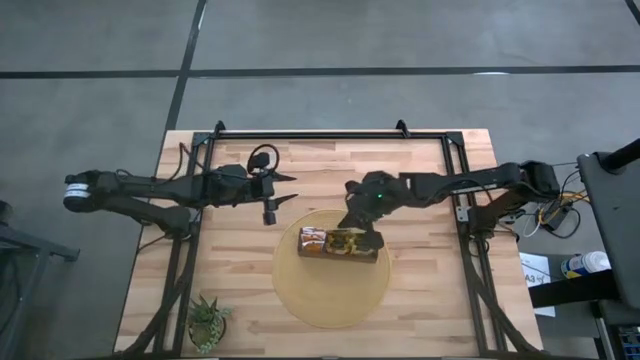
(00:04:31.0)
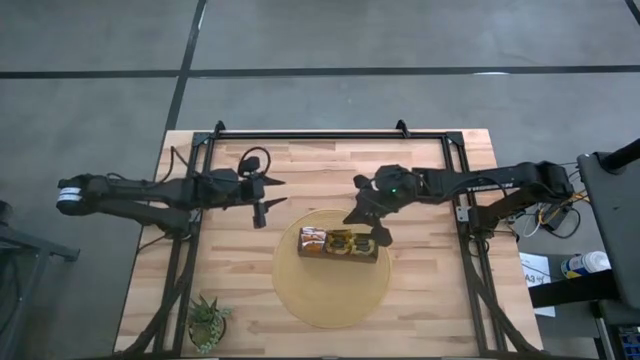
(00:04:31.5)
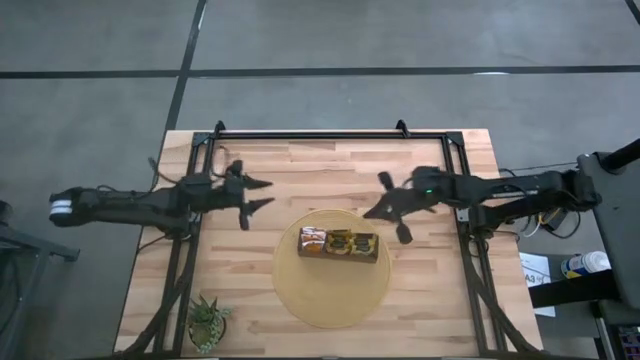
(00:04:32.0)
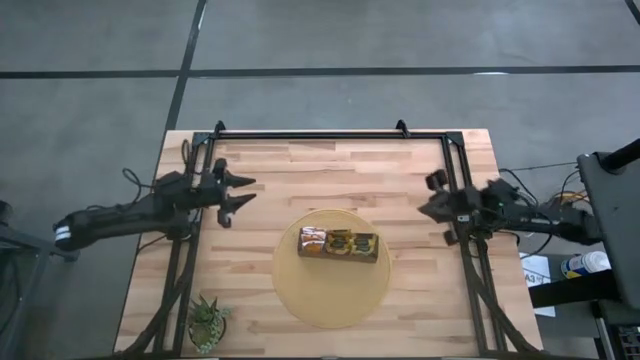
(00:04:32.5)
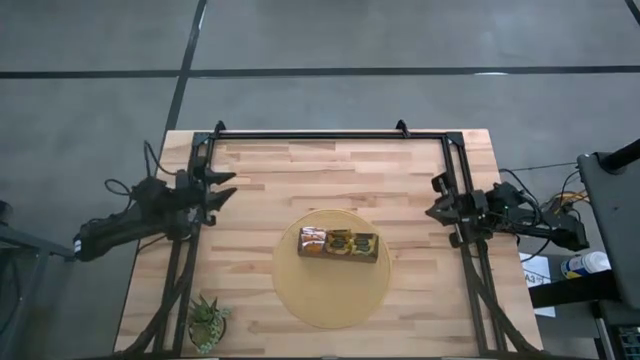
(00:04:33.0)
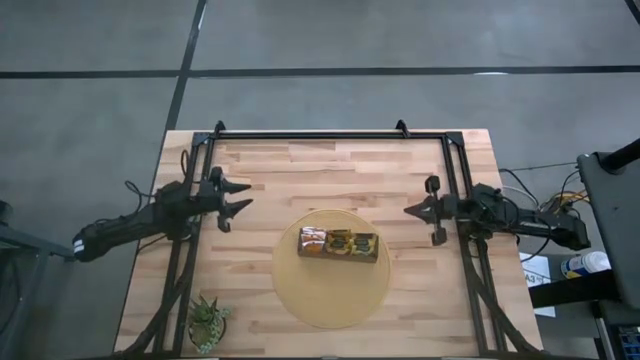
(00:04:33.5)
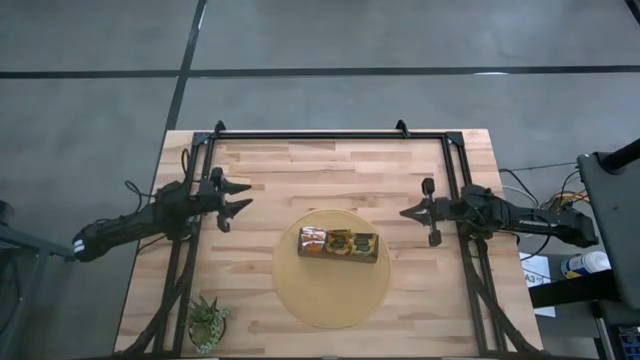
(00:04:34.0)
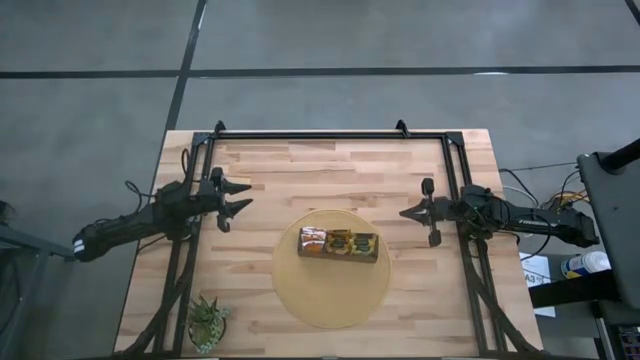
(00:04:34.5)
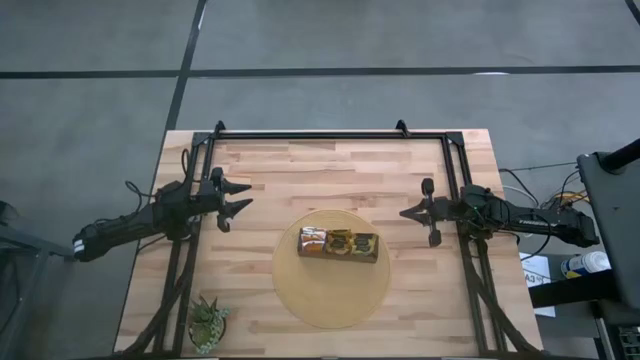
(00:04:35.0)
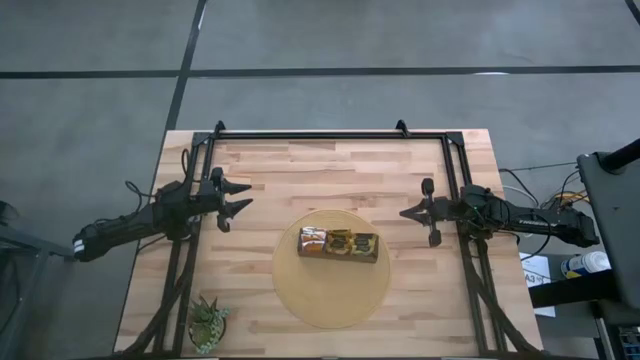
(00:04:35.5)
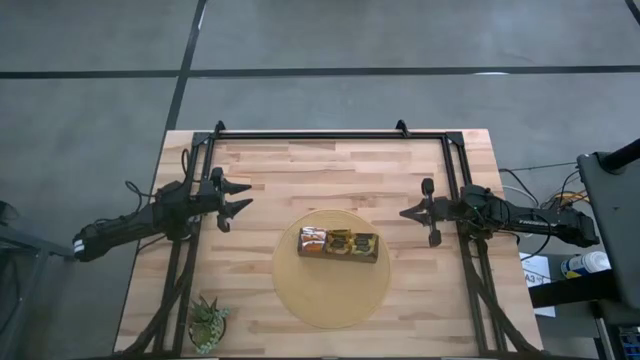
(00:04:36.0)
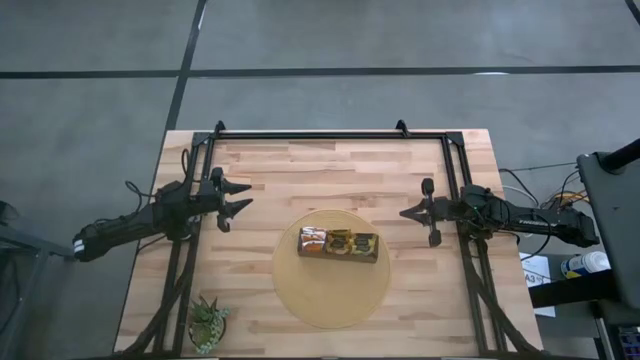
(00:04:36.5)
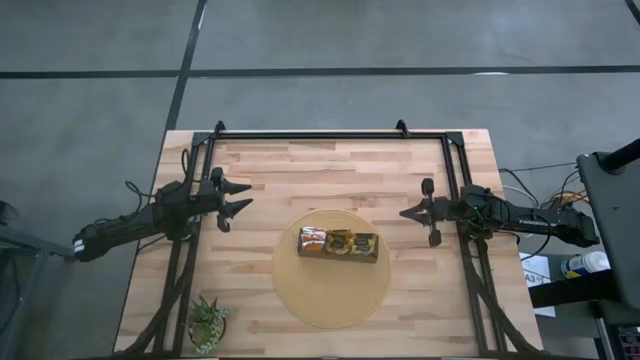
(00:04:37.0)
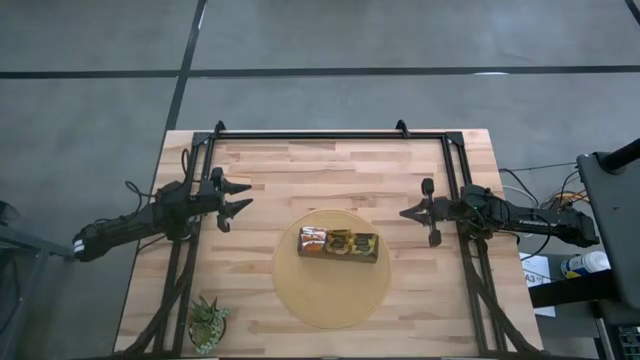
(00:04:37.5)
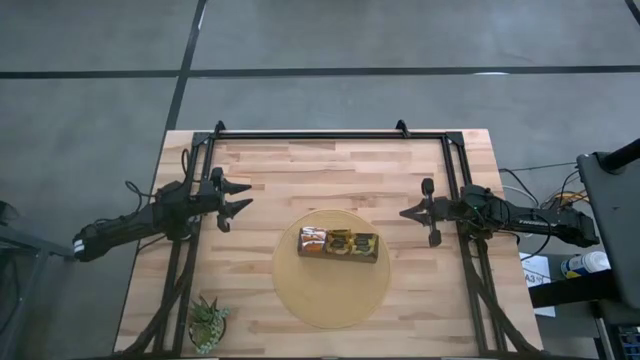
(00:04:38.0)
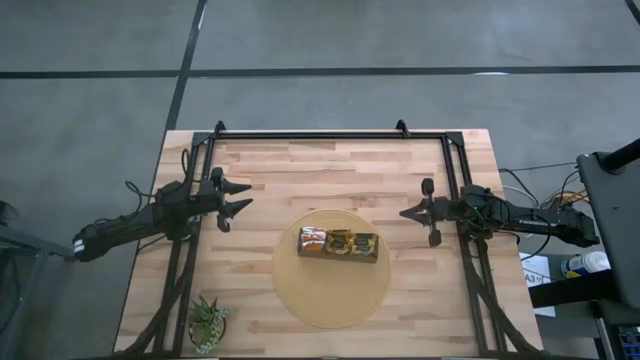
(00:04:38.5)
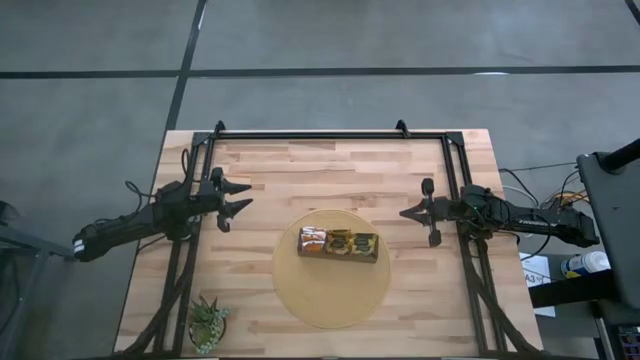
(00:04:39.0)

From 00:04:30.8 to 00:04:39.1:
Task: Pick & Place Tea
Return to Home Position

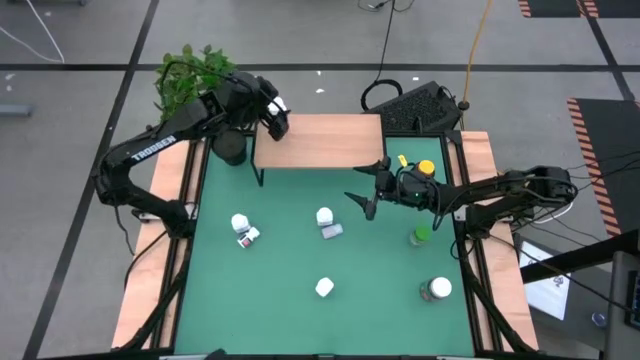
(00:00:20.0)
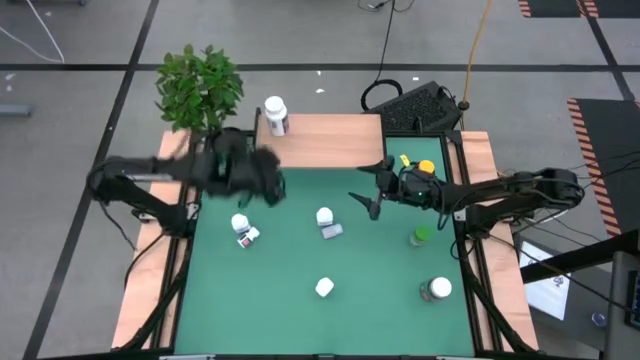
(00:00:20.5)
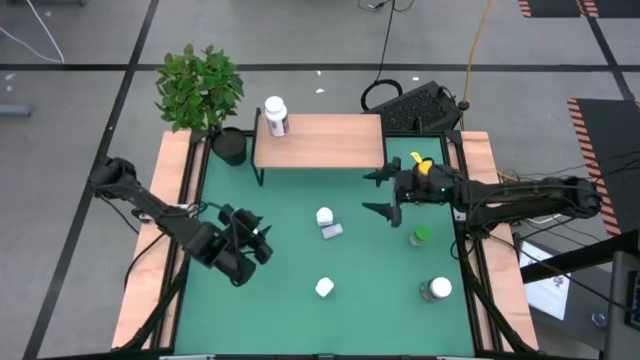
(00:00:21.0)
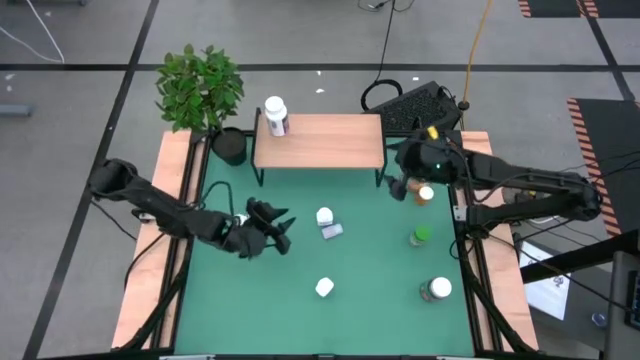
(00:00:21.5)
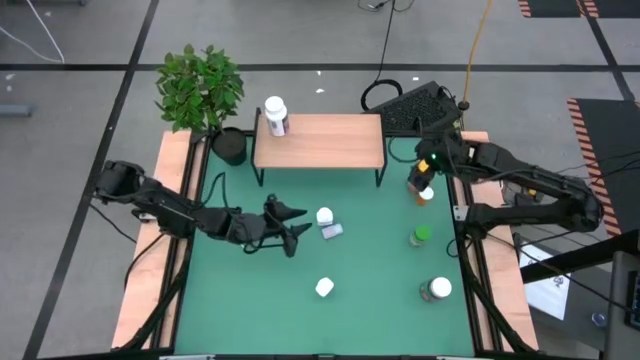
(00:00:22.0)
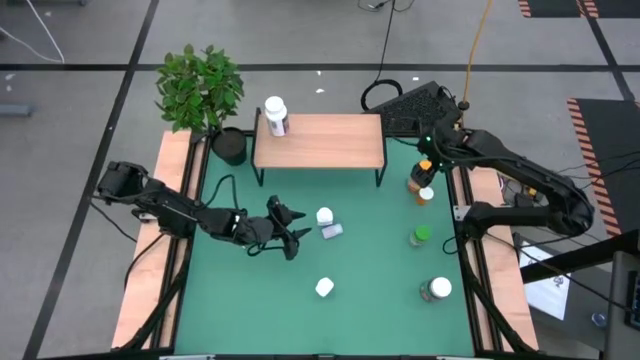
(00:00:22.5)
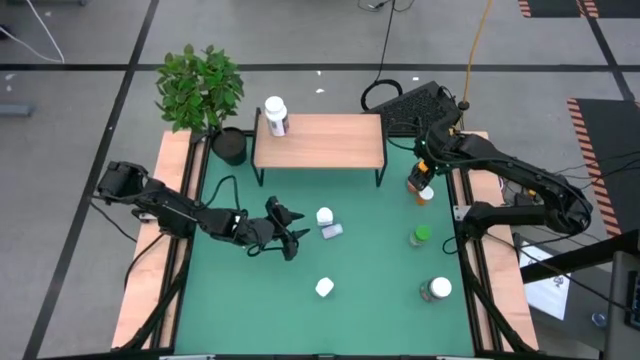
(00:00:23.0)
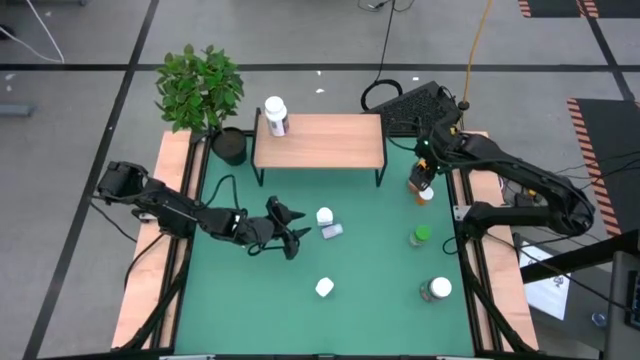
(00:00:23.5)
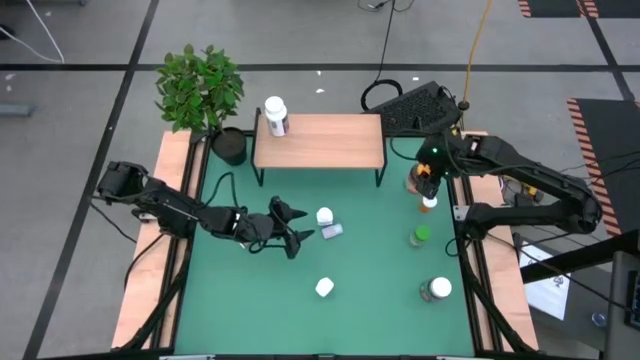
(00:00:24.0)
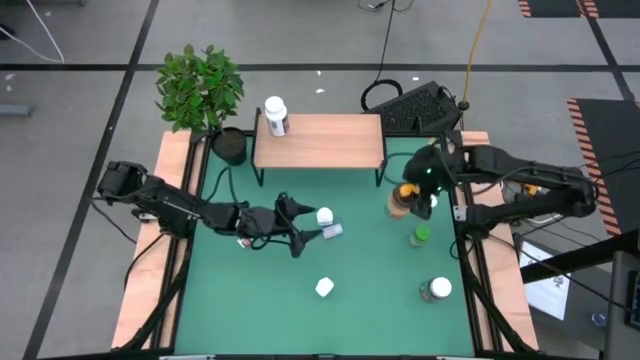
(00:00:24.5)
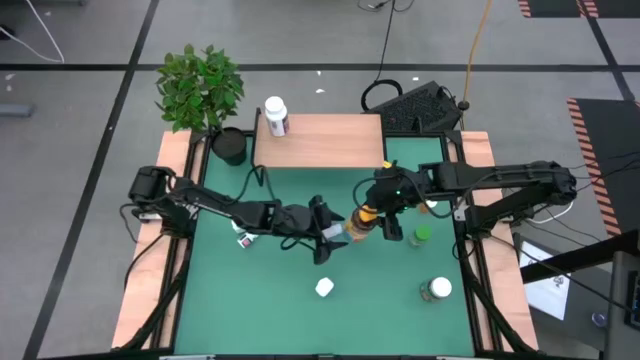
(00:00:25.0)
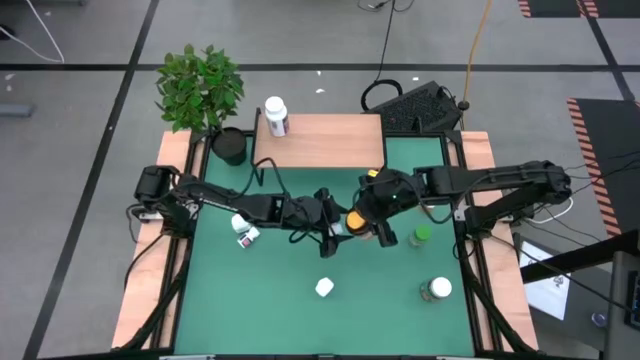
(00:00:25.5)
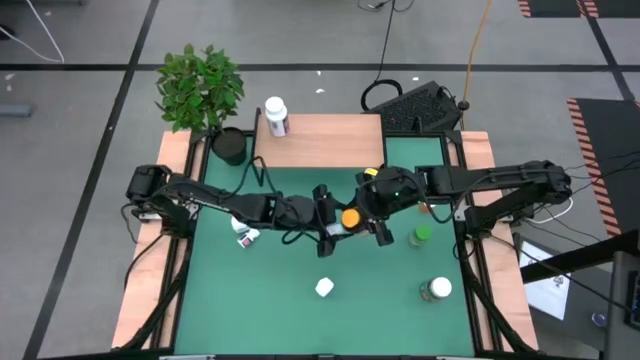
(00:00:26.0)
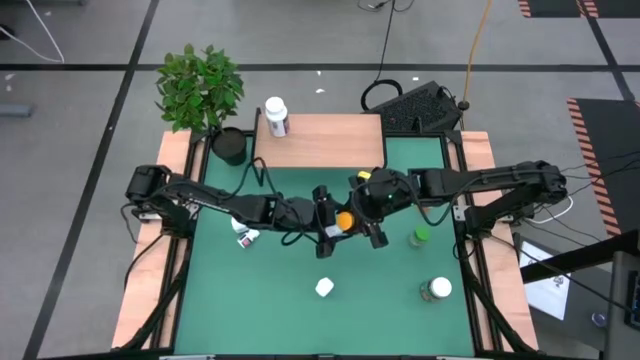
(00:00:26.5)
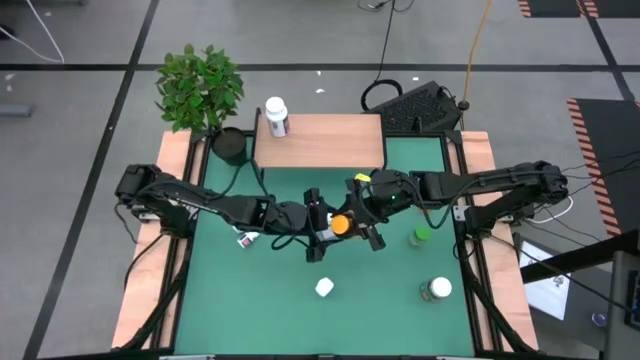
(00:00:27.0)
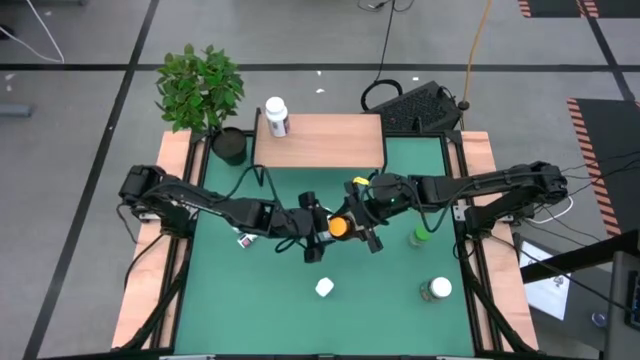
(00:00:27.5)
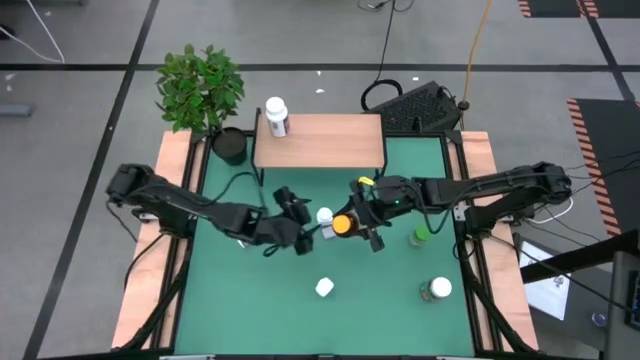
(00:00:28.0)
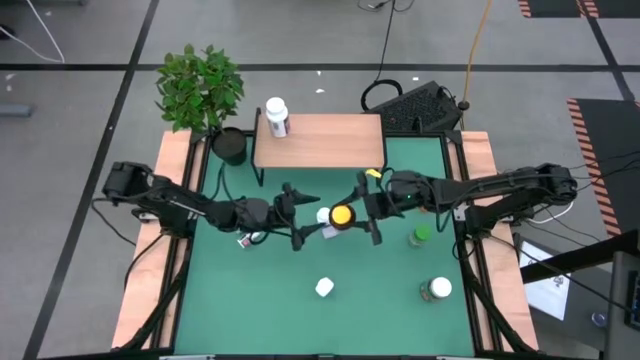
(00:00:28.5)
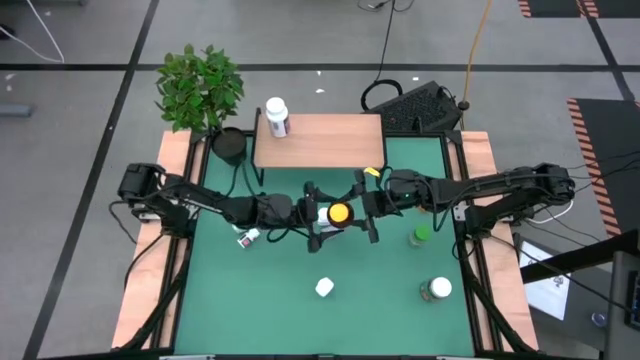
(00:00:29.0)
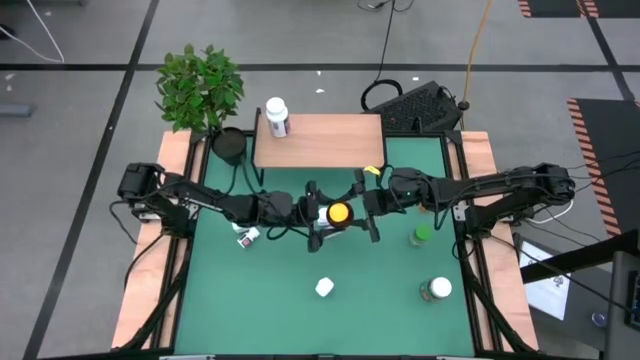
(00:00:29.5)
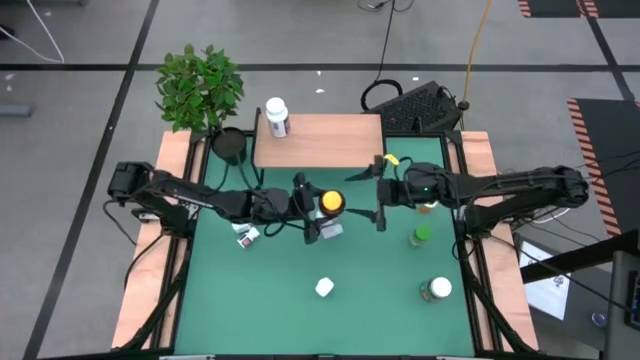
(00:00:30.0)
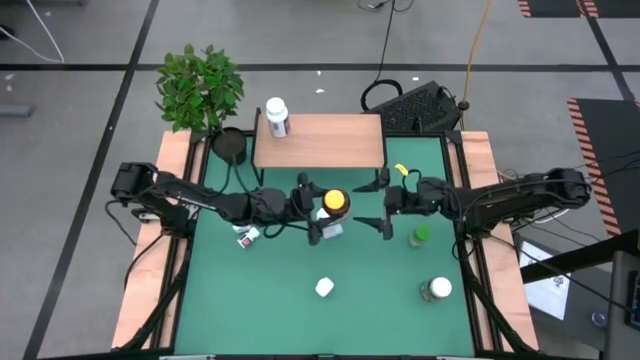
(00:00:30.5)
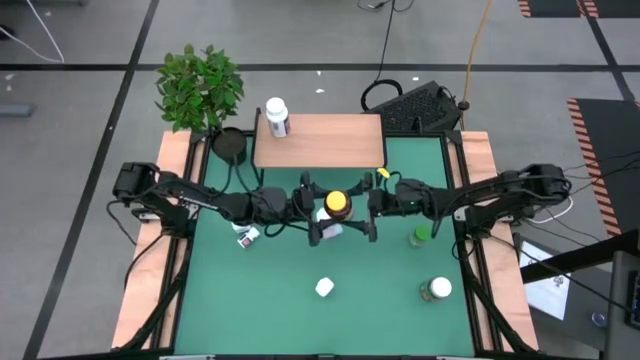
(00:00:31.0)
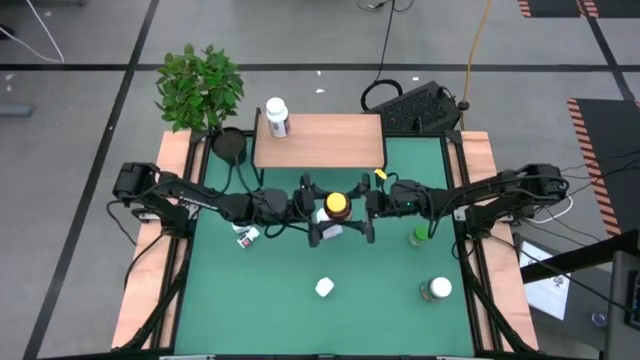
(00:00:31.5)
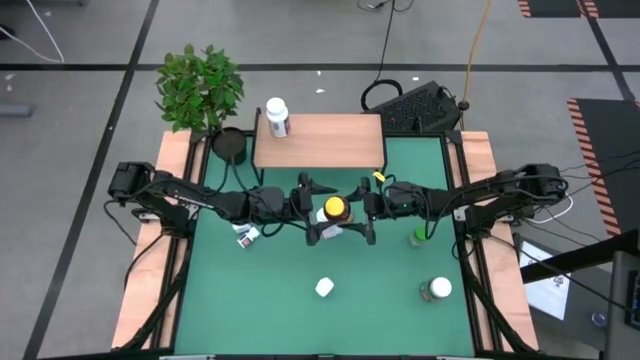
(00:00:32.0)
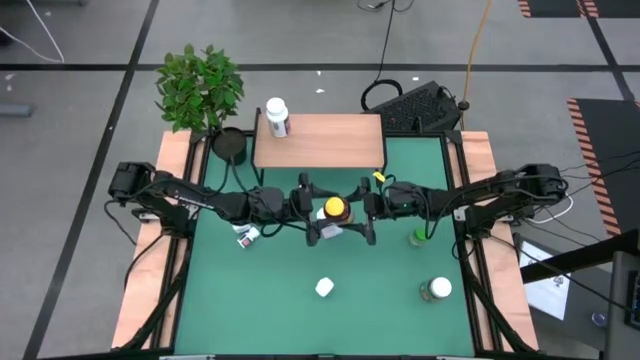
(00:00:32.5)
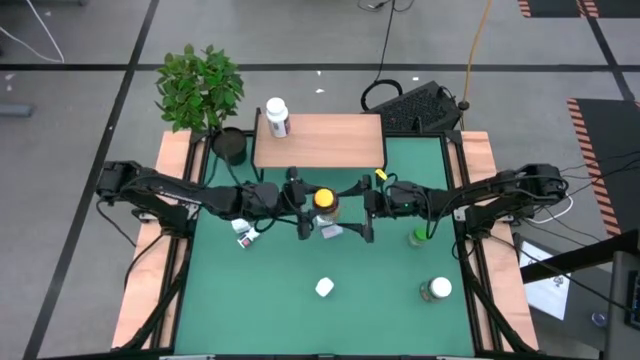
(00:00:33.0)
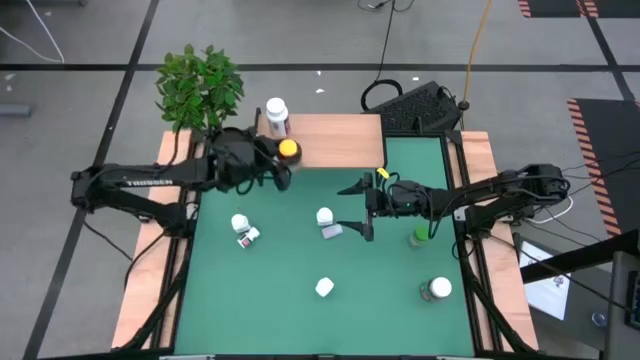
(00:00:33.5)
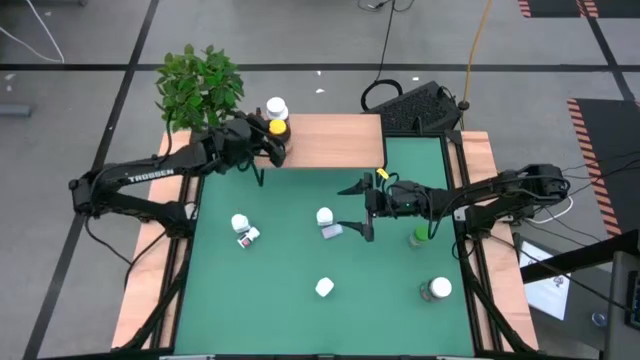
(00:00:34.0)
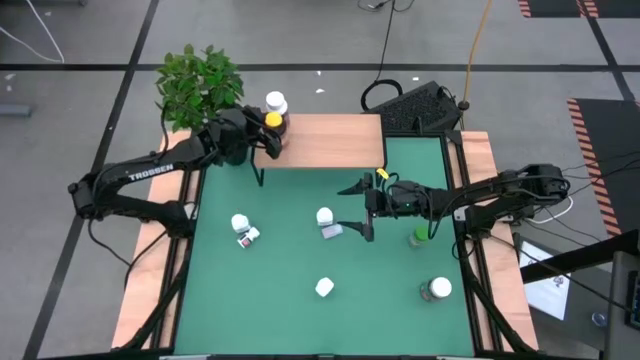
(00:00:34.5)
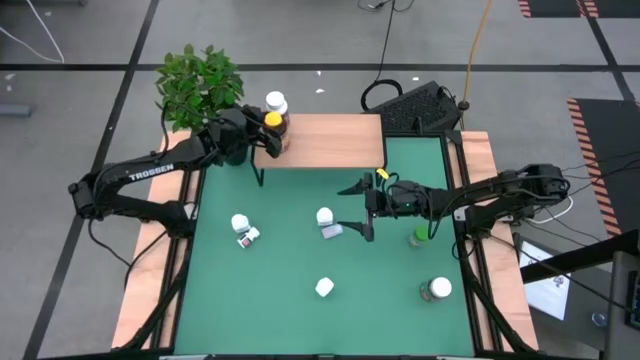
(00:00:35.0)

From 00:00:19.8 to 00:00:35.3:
Task: Pick and place medicine bottles onto shelf by color
Put the yellow pill bottle on the shelf
